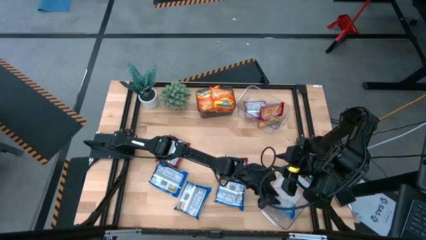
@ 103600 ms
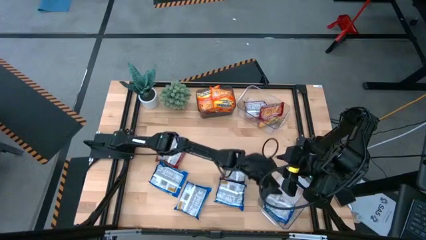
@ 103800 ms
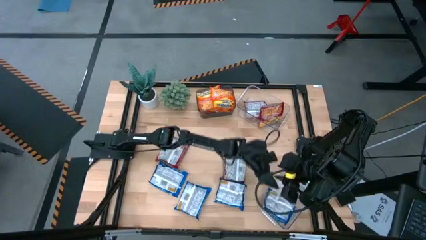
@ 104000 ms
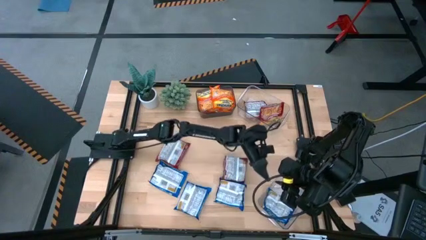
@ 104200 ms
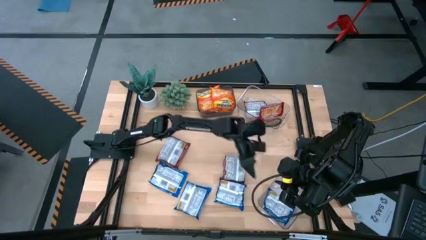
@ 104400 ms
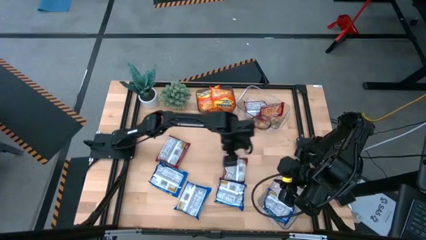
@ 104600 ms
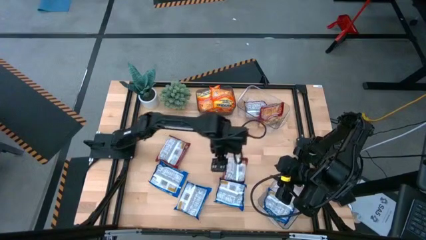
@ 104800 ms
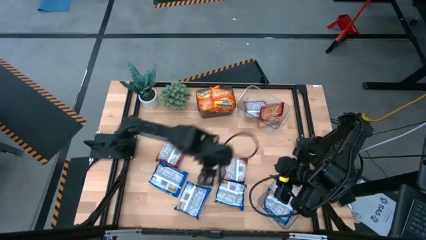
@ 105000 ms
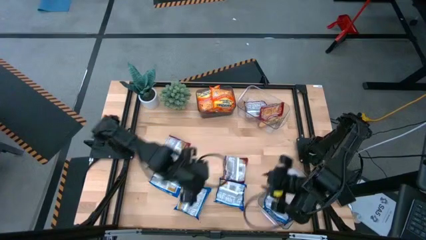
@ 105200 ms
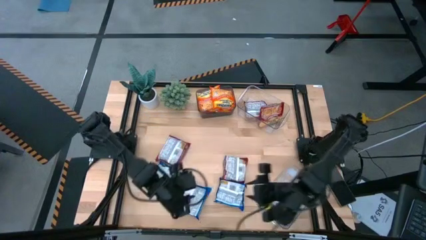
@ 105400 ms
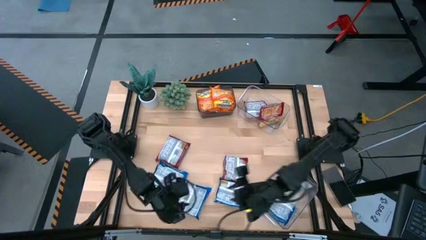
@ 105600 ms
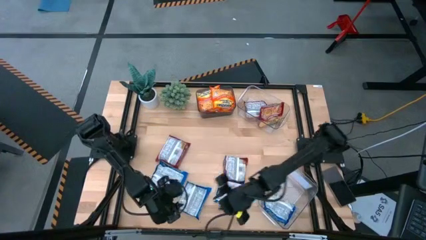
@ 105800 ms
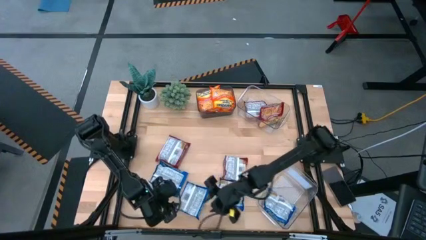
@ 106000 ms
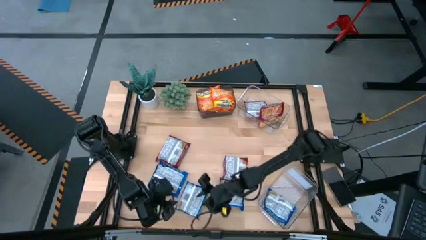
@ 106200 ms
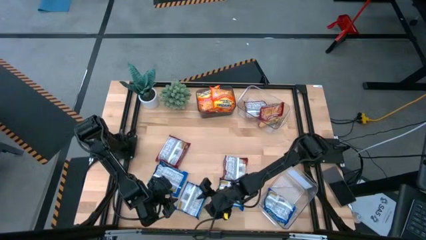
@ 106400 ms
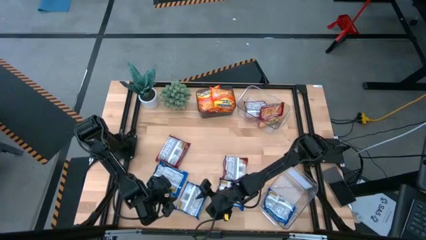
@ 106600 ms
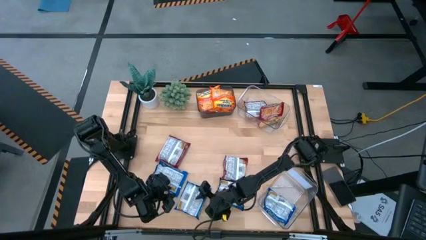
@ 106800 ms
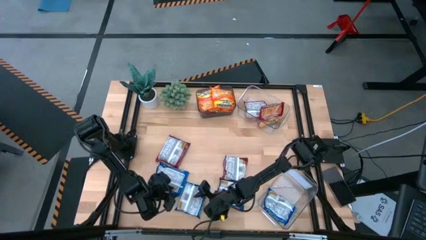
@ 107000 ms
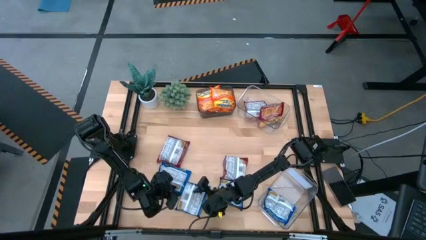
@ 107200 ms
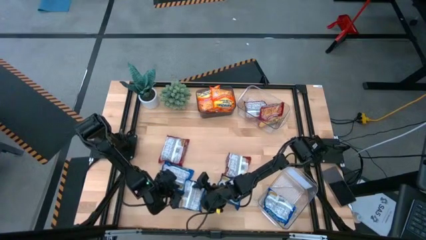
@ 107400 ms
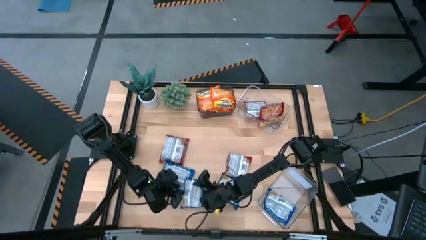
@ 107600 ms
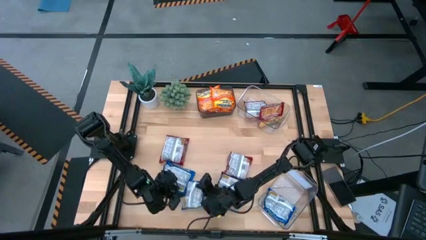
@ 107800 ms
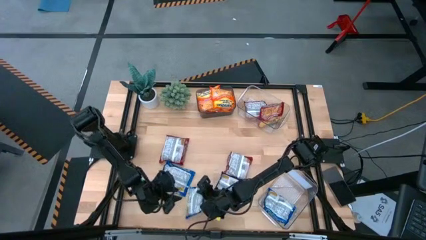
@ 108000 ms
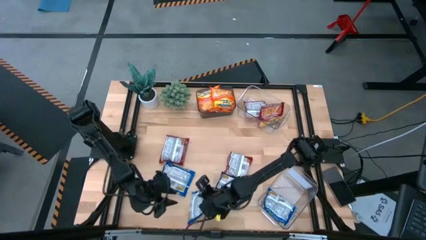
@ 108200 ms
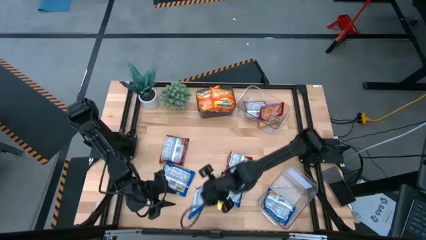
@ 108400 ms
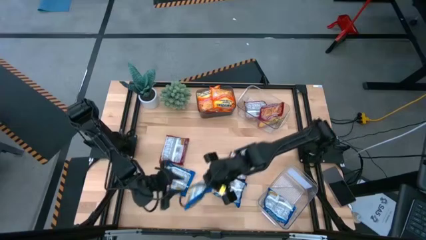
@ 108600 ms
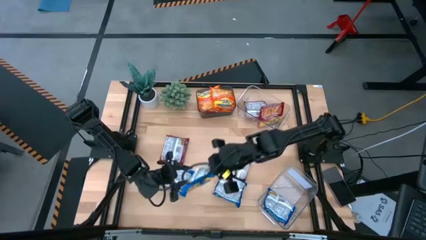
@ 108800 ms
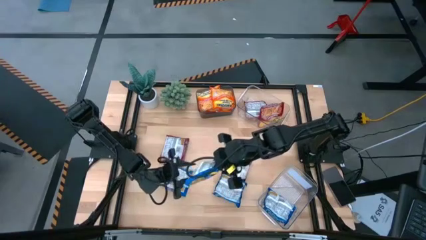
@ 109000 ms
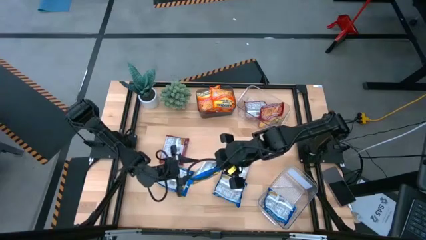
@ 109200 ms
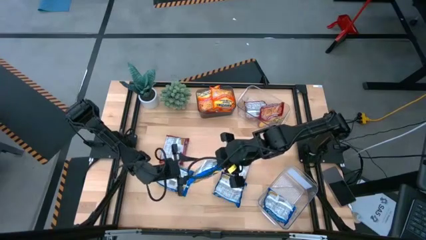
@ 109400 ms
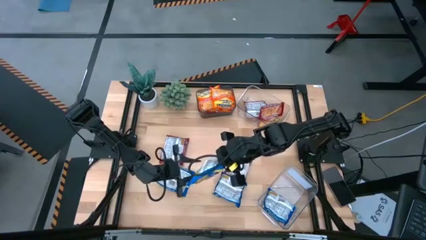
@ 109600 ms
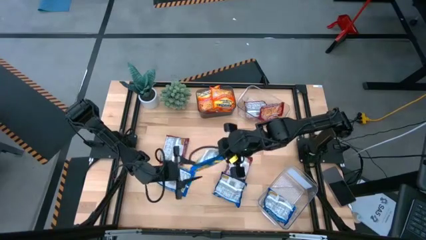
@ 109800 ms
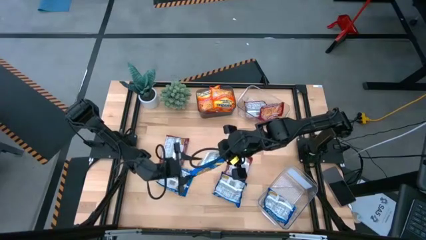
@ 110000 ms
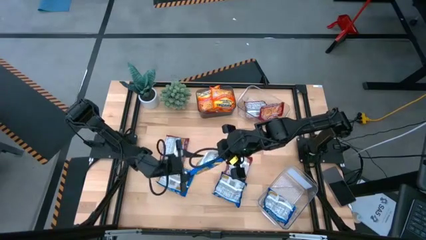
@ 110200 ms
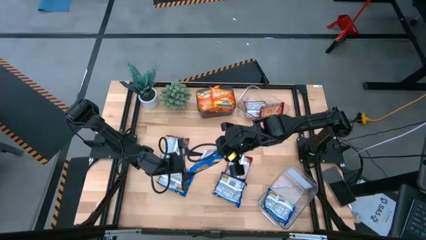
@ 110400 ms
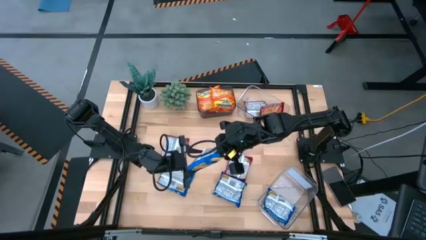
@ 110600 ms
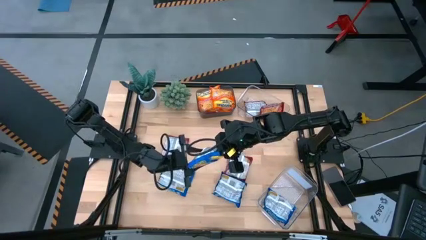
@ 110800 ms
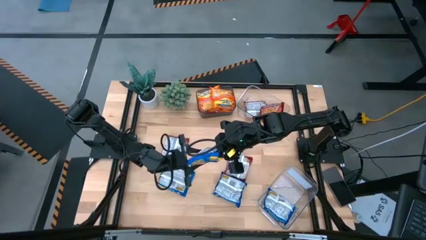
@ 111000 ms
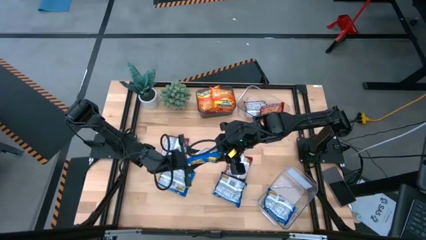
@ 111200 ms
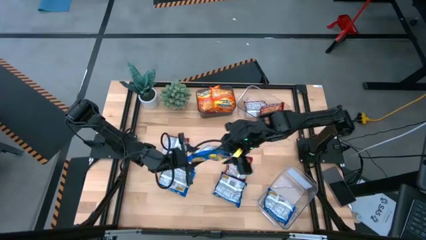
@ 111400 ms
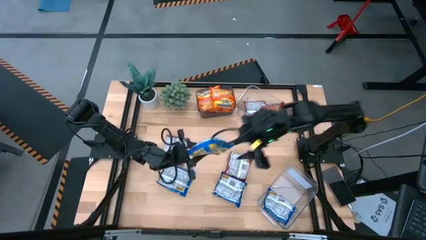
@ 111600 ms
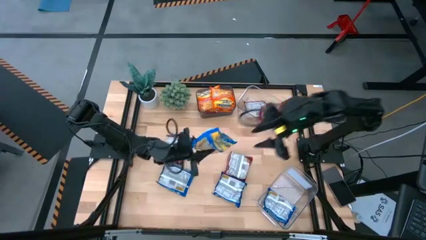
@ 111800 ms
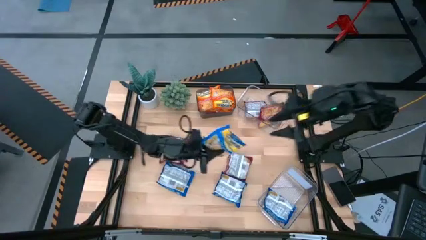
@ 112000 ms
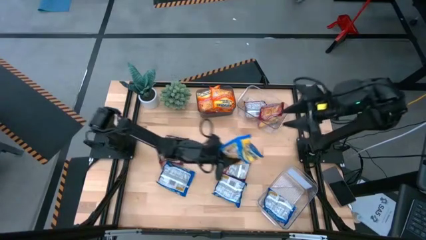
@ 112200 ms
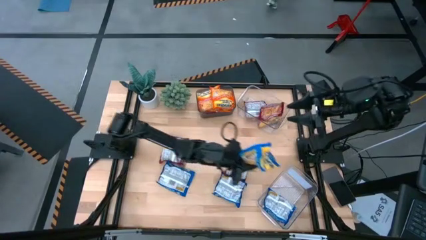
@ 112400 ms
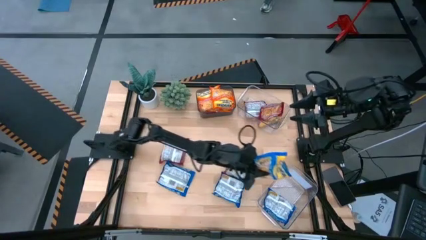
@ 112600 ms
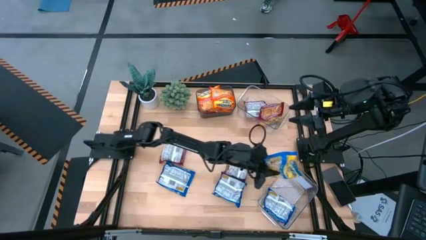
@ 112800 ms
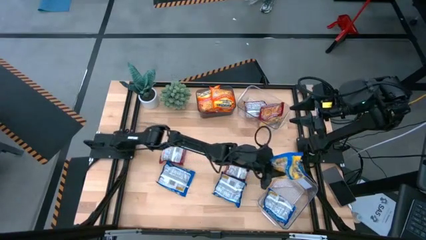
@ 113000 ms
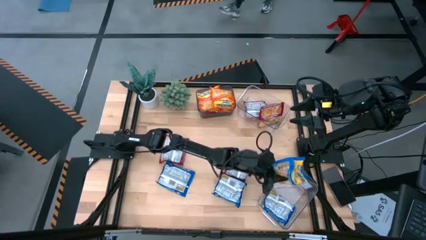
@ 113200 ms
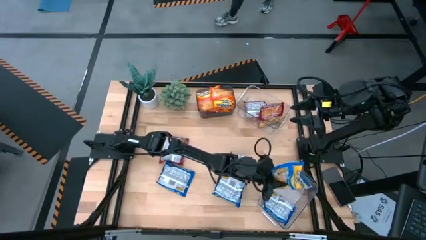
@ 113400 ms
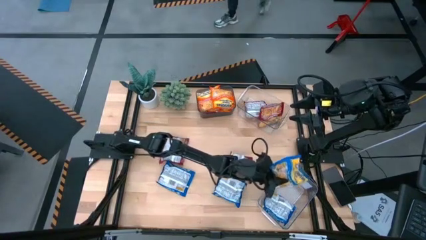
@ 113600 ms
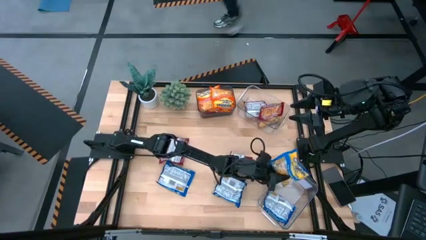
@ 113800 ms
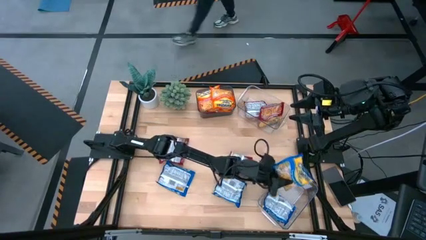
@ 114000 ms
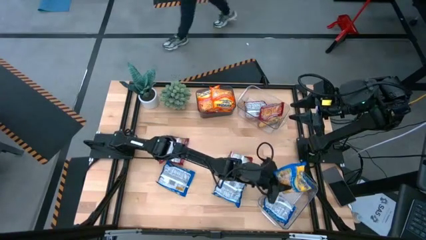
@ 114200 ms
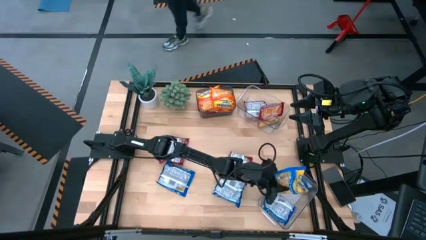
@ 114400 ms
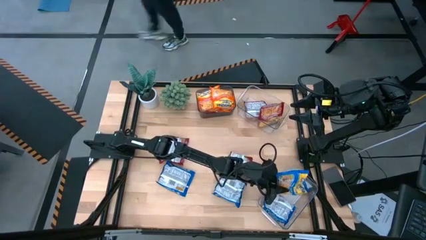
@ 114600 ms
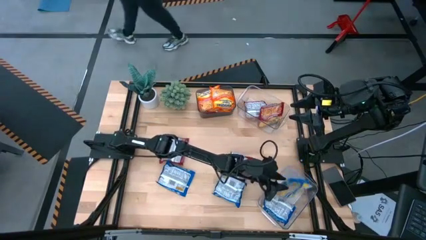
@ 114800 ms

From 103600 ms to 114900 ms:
Task: Sort Maruchan noodles
Put the blue noodle pack into the bottom transparent bin

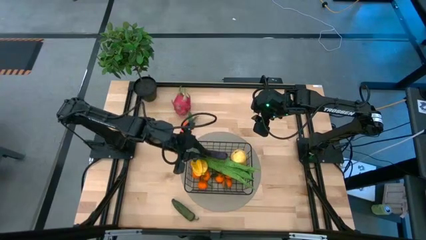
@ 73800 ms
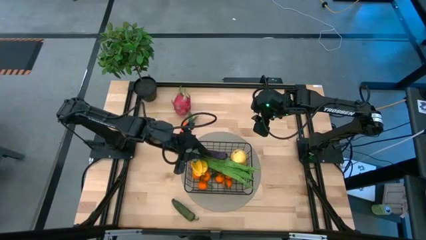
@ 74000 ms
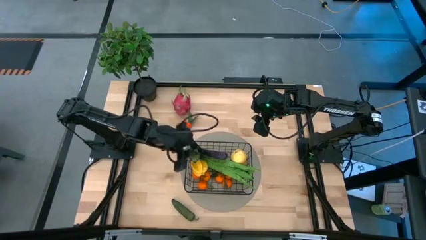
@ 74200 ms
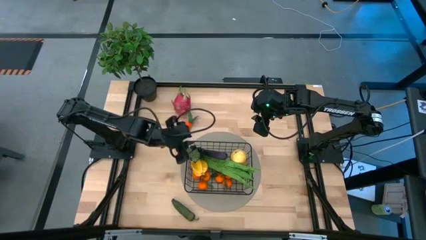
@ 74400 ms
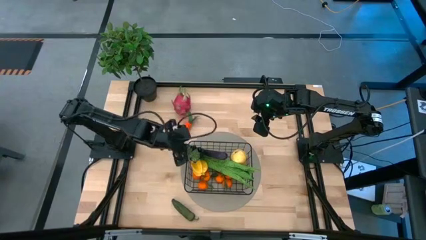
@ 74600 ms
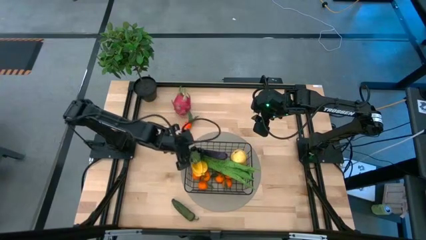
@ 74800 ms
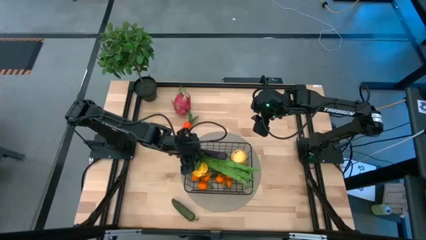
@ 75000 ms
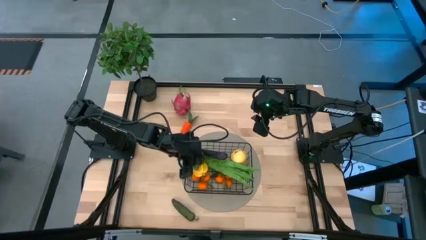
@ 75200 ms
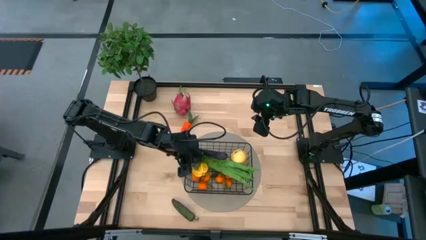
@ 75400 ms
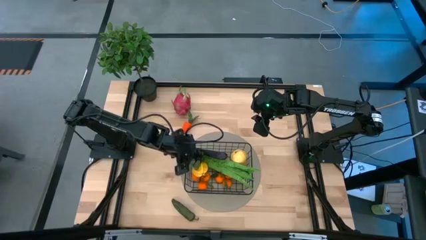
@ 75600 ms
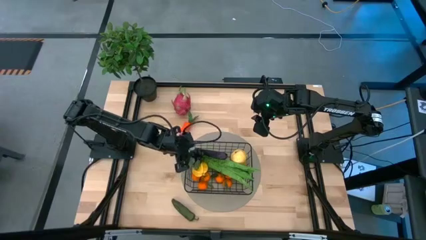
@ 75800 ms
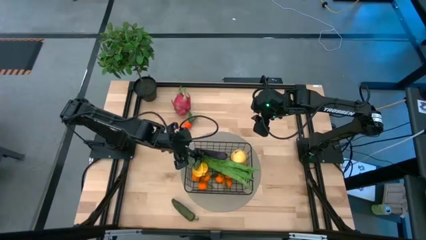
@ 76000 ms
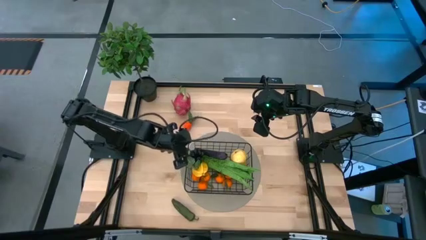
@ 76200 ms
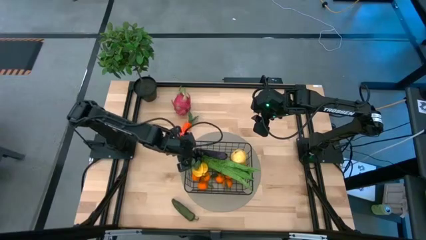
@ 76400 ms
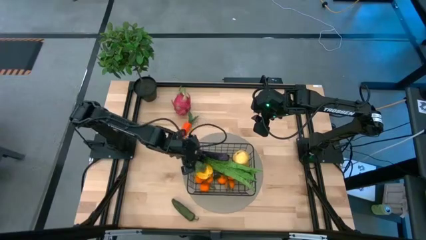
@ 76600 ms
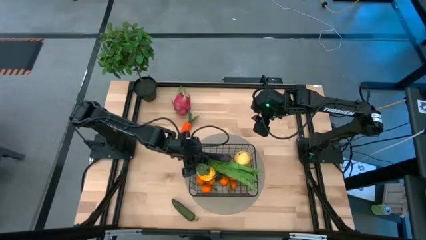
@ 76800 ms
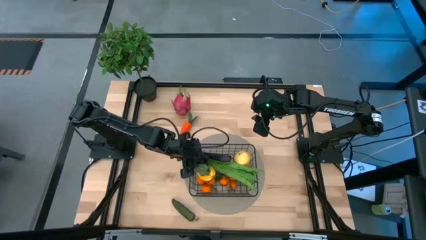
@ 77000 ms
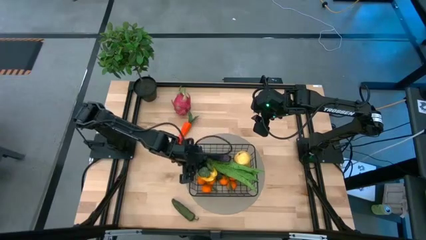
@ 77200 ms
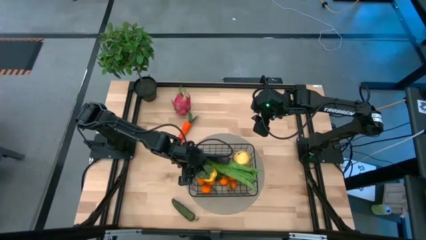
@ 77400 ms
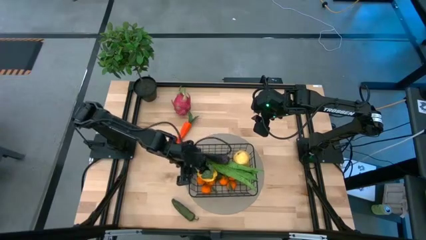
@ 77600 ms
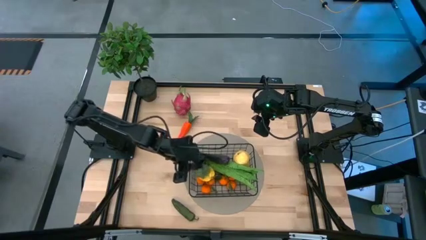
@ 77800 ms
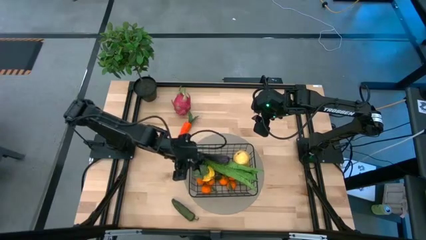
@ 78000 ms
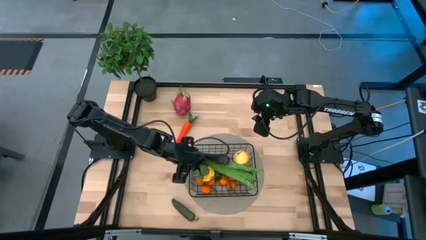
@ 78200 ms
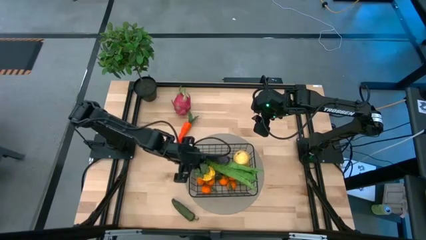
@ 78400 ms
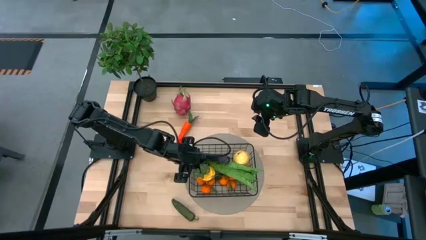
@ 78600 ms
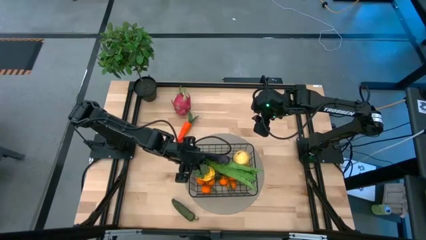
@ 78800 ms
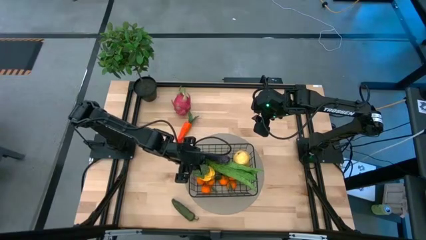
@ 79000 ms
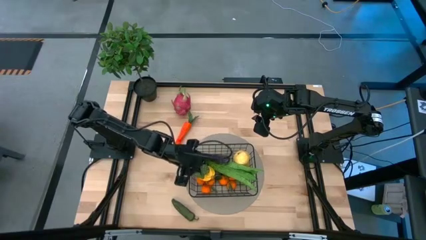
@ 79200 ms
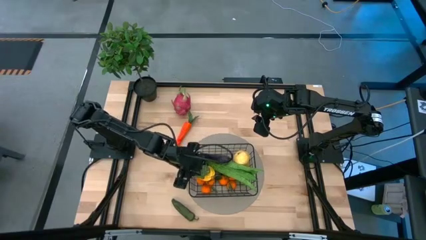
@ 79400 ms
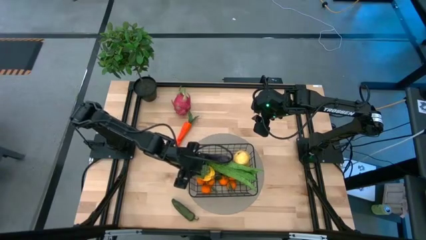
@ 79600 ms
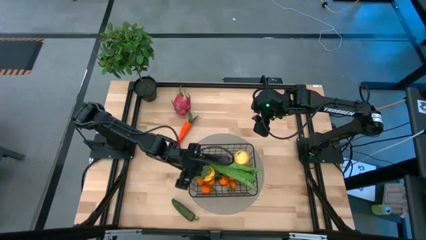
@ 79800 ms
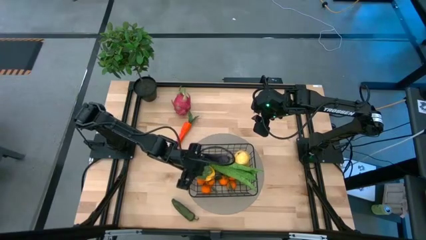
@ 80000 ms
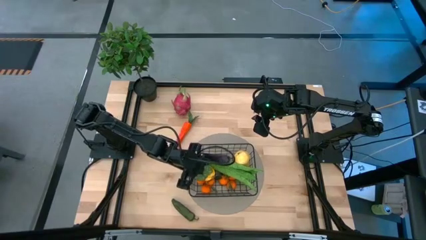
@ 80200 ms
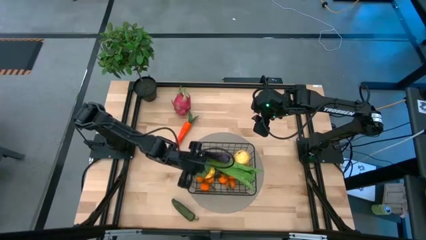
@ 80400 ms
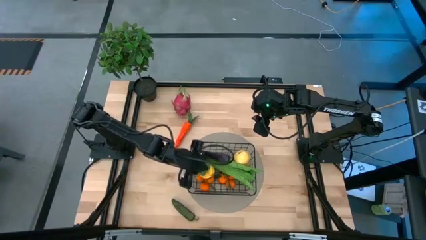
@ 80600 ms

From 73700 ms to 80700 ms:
Task: Build produce basket
Adjust the grapes
